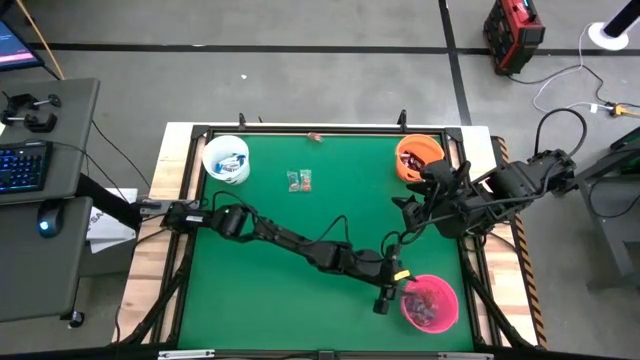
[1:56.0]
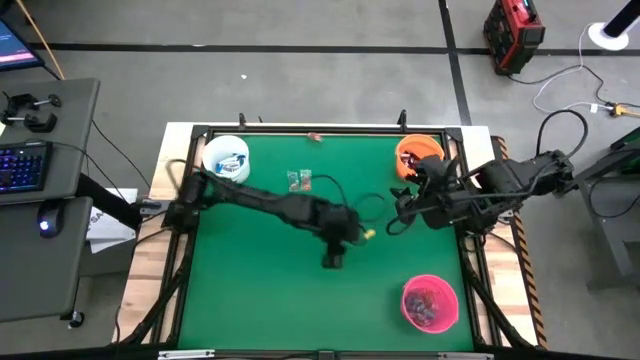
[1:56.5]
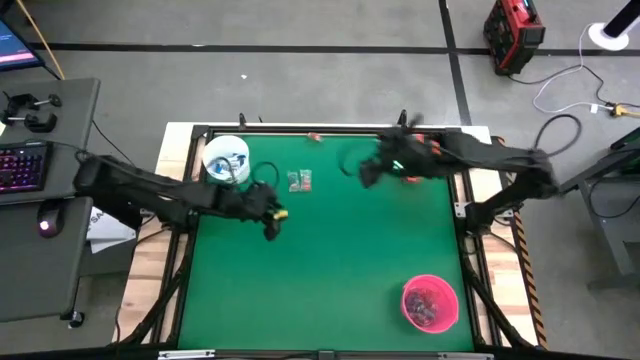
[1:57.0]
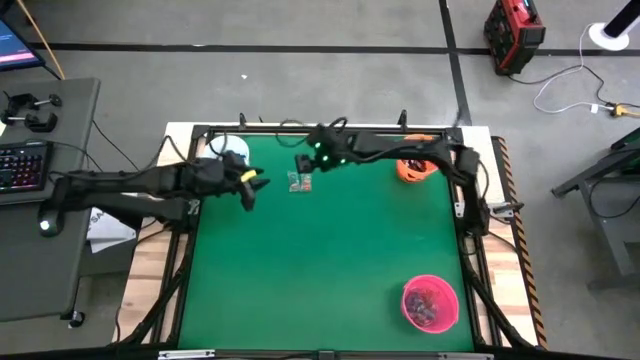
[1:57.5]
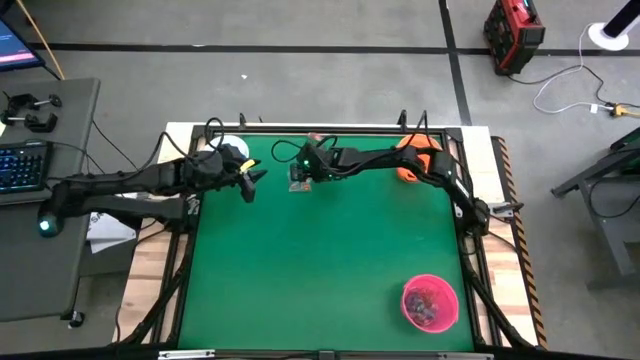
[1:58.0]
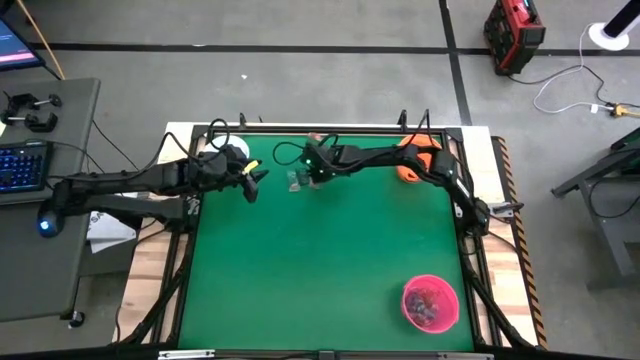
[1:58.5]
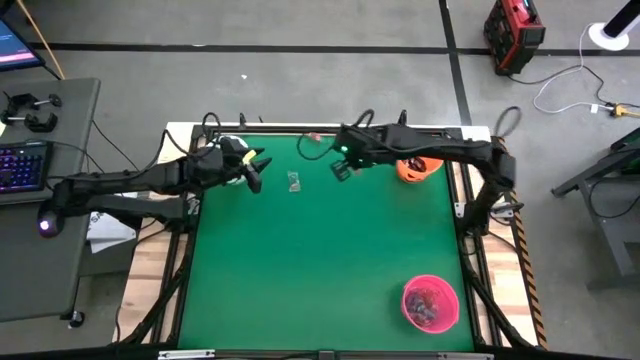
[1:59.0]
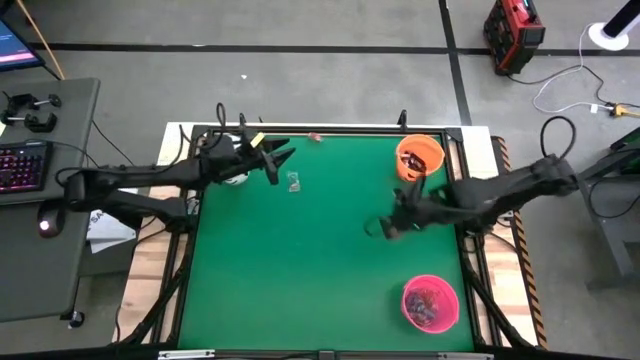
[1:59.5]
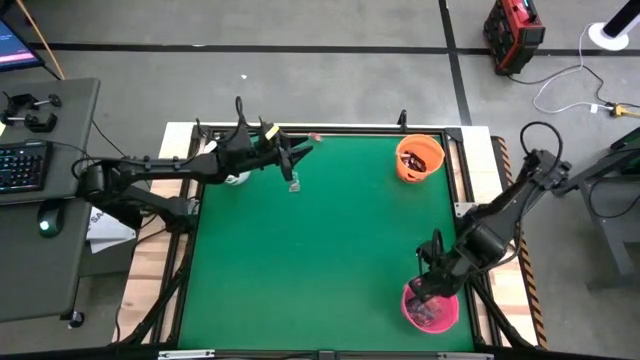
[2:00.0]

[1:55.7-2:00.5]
Task: Sort candy by brand, put in halloween buckets
Put the orange gummy into the pink bucket

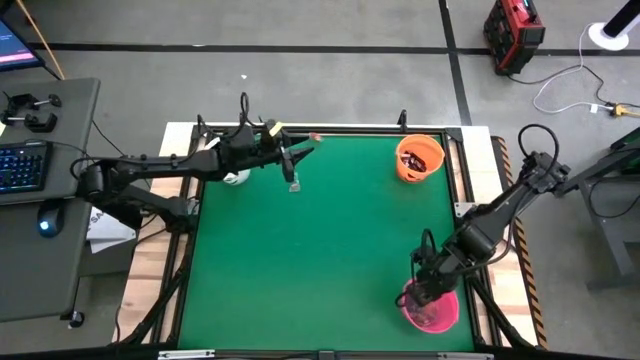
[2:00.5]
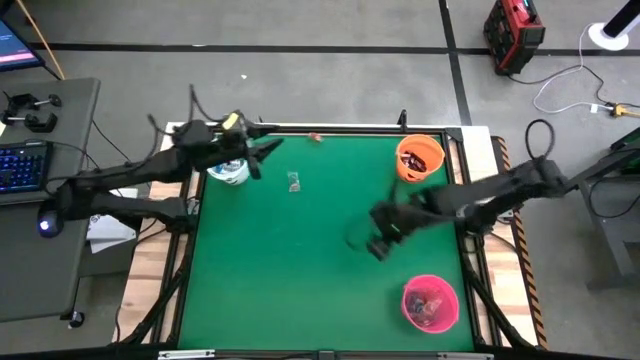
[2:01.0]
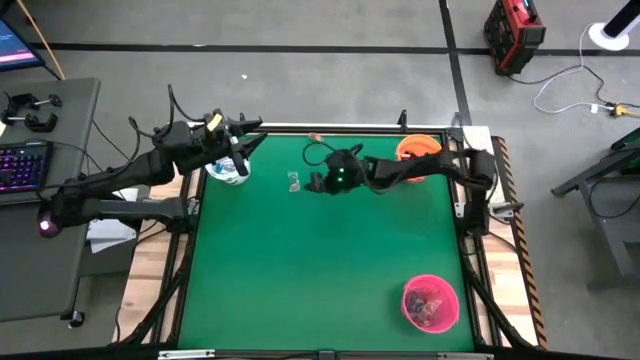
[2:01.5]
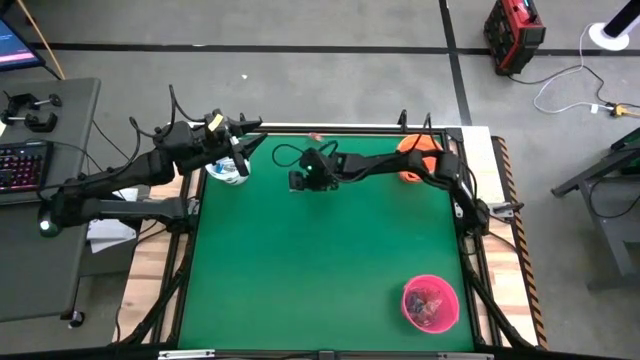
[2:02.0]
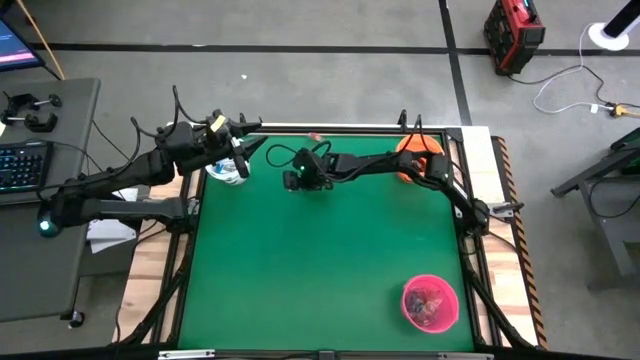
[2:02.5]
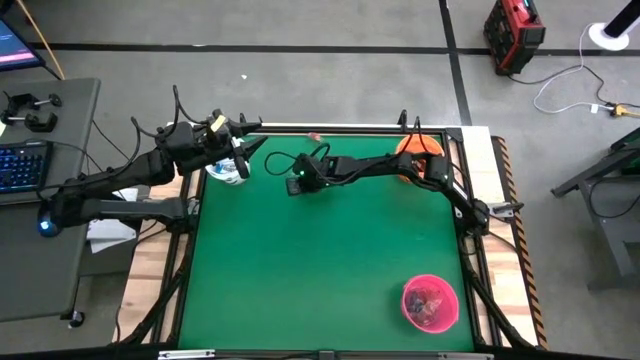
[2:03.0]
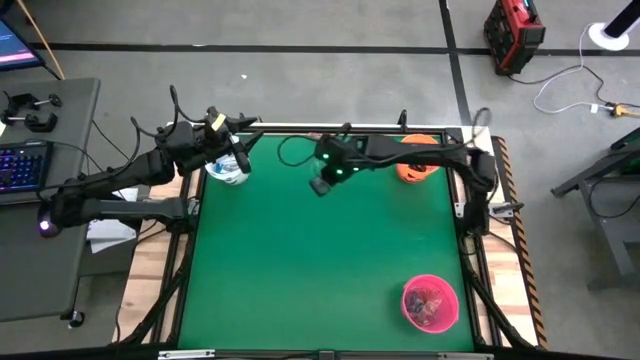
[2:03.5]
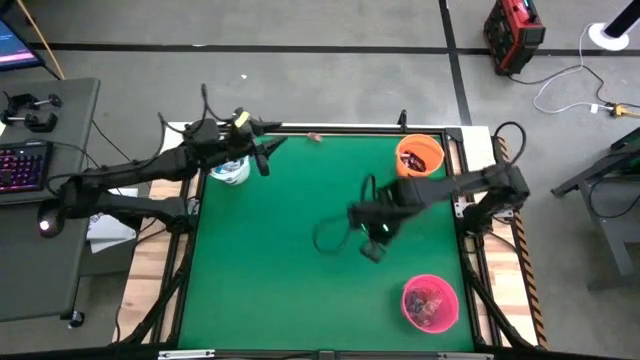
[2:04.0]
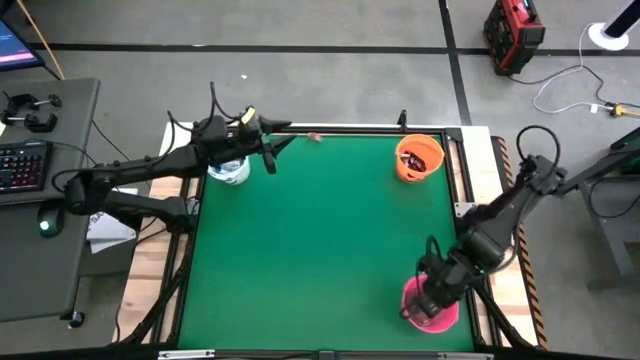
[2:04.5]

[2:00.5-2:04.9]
Put the blue gummy into the pink bucket

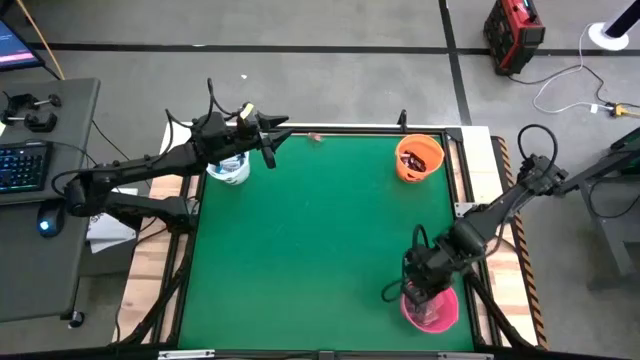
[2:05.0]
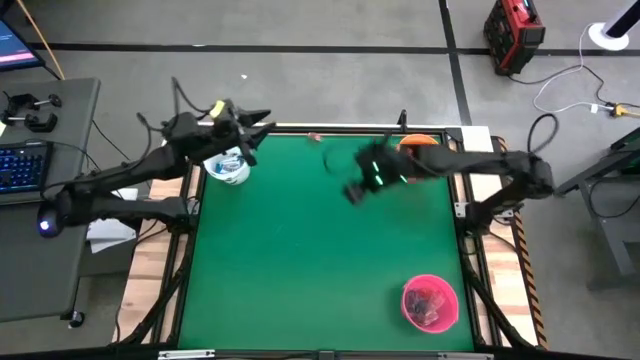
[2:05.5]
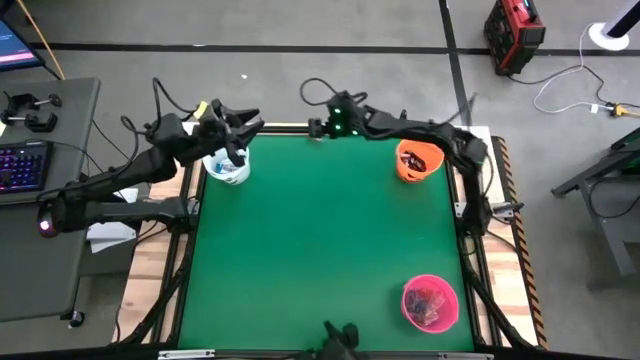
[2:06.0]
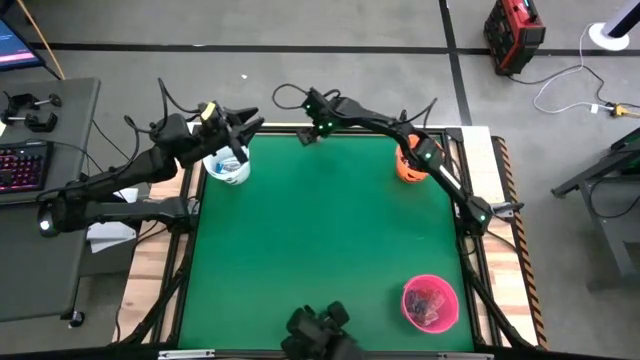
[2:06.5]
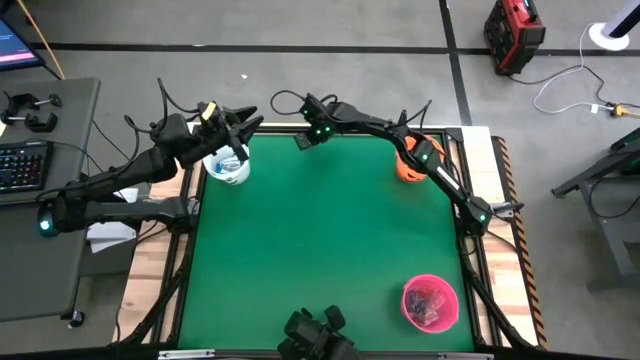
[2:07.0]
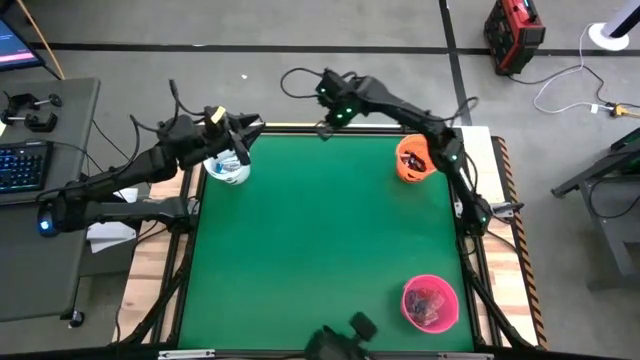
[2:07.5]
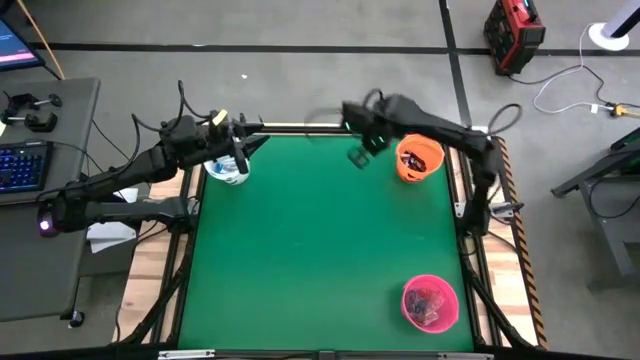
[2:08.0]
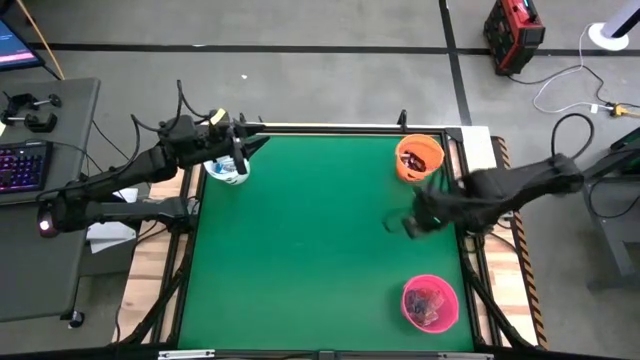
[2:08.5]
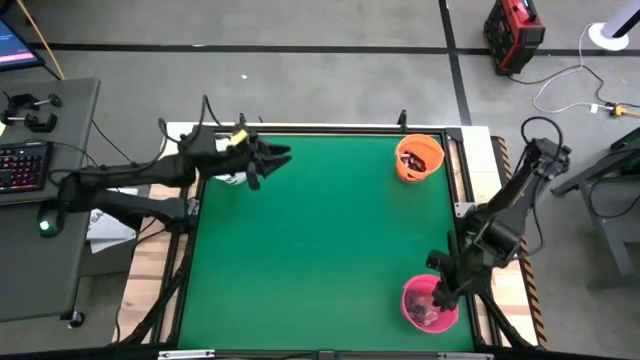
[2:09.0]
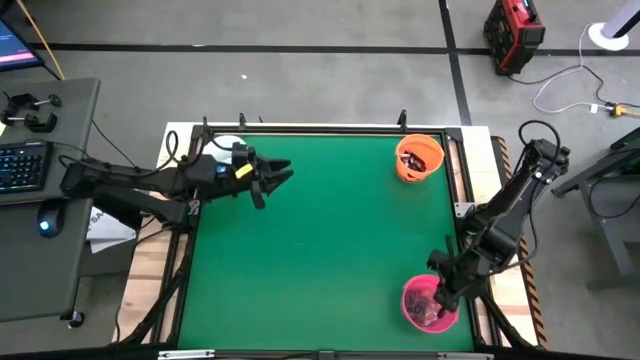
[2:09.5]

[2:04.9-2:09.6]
Put the orange gummy into the pink bucket

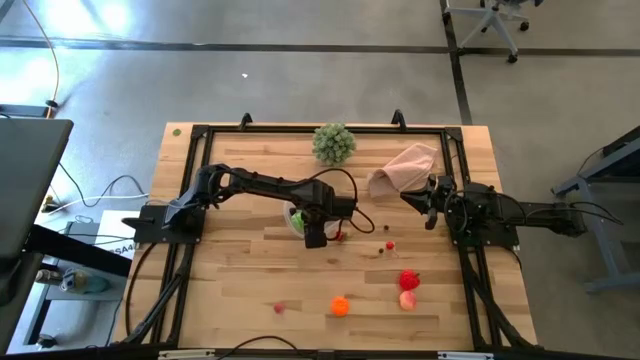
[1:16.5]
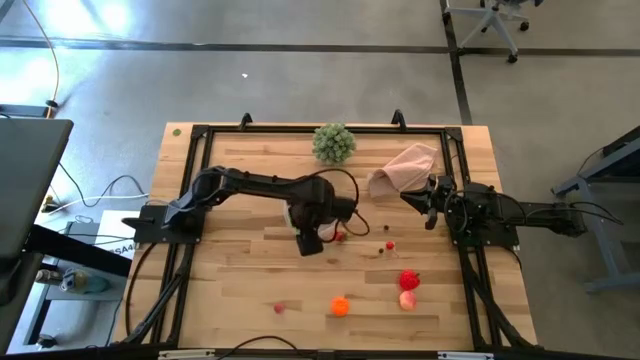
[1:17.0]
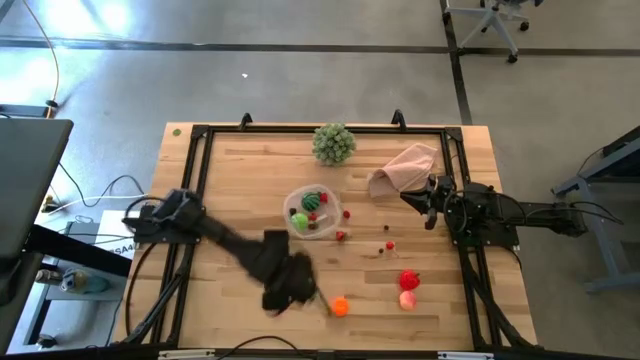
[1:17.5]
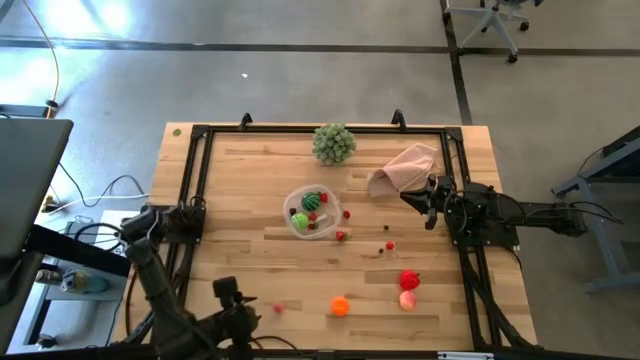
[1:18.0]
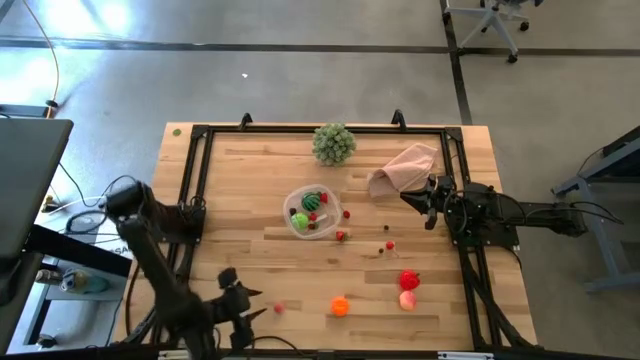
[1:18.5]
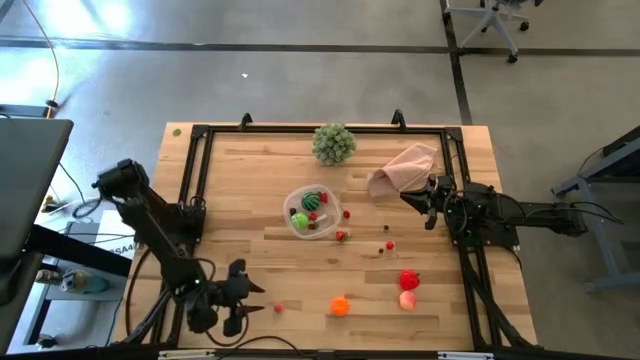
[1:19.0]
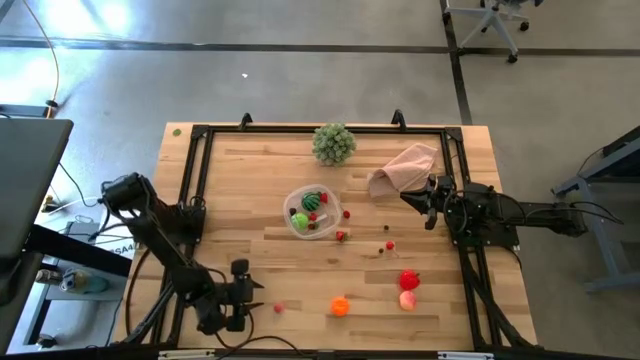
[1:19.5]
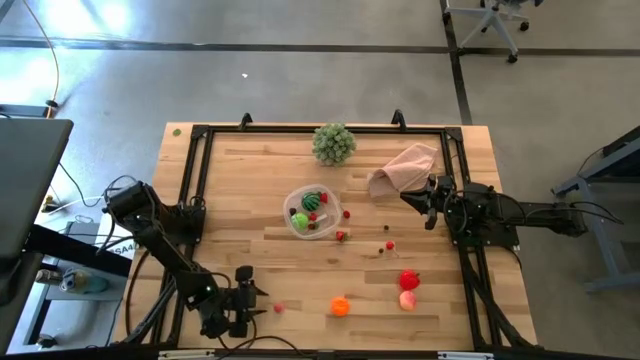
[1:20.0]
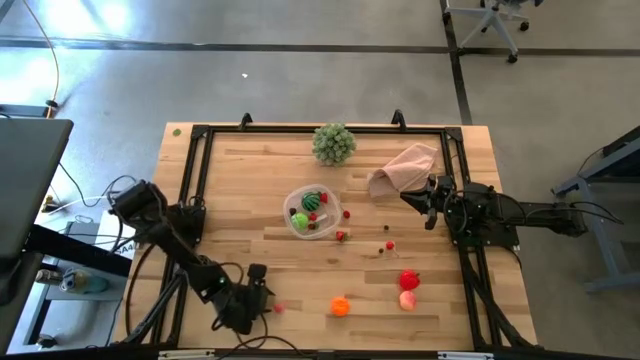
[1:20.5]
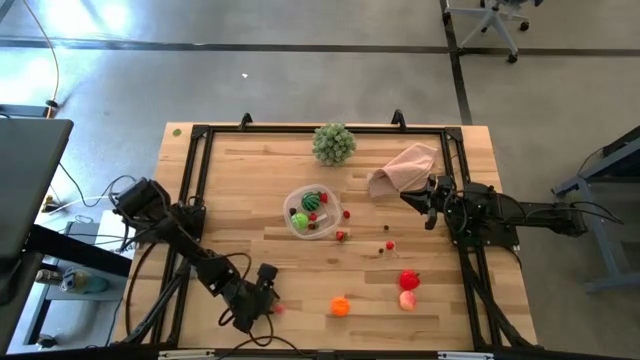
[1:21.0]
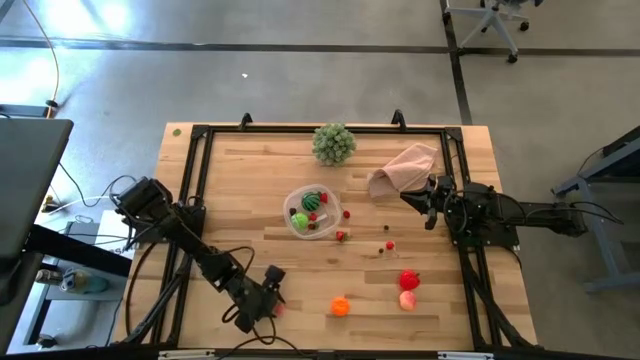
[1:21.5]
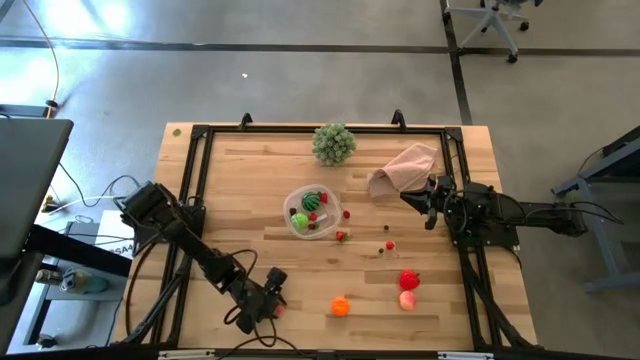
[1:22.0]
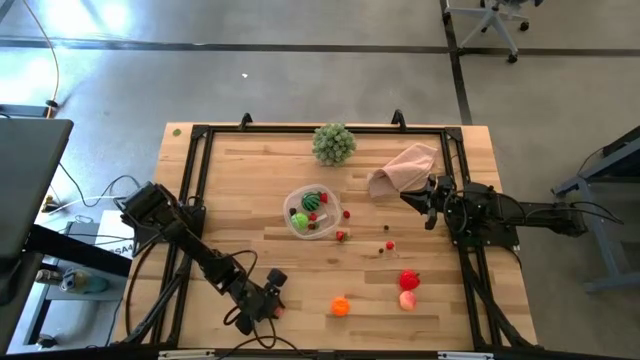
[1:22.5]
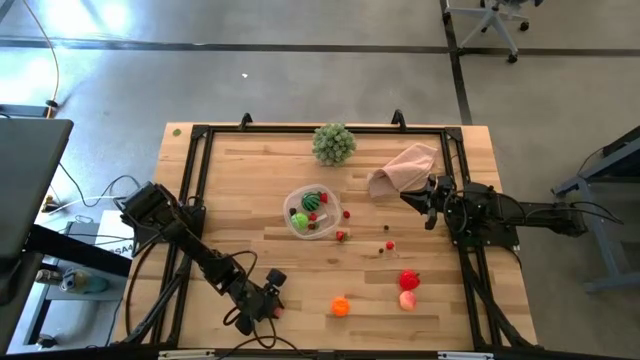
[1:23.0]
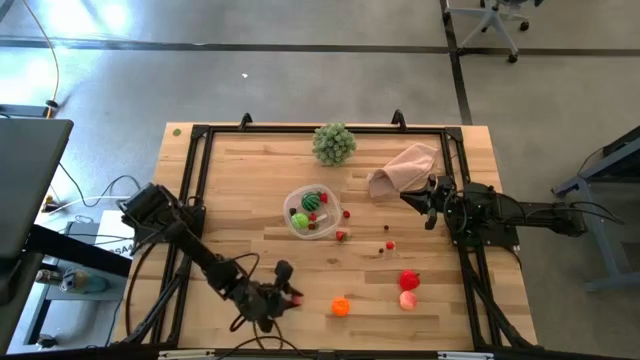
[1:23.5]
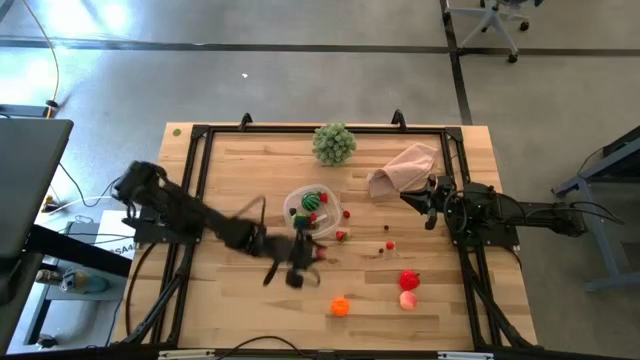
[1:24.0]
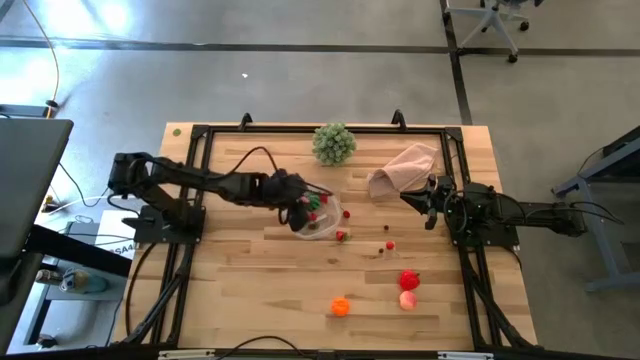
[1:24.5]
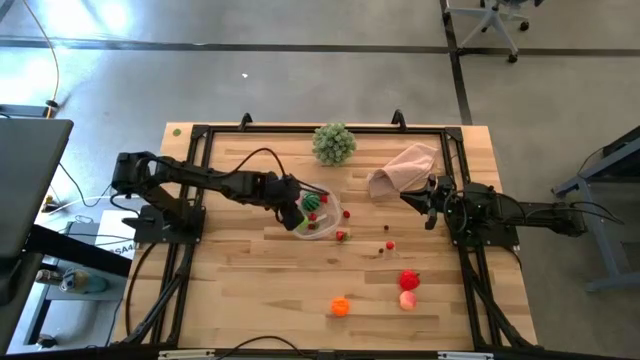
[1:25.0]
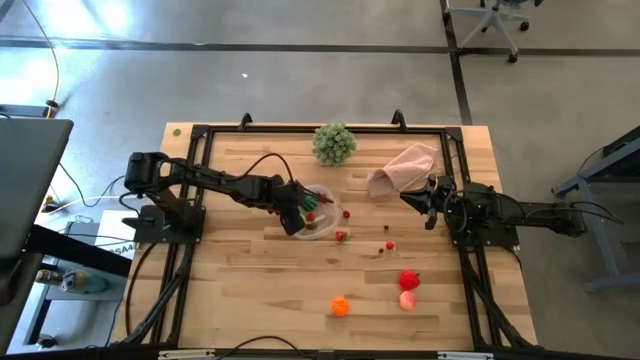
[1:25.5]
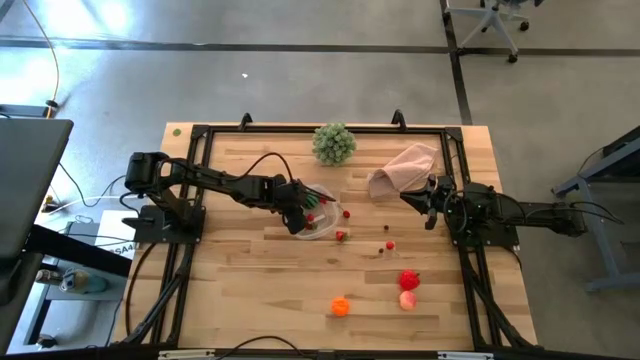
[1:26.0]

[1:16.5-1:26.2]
Task: Pick and placing Produce into tupperware
Put the pink peach into the transparent bin
